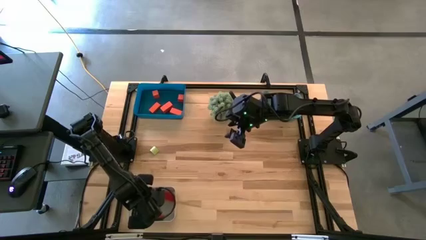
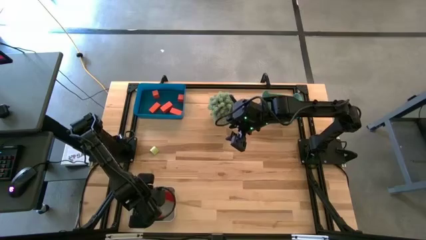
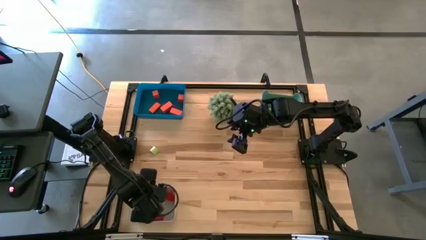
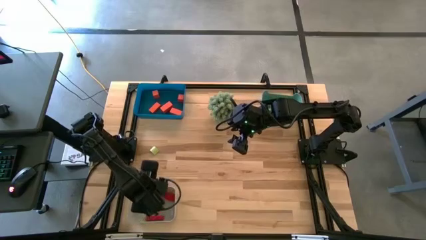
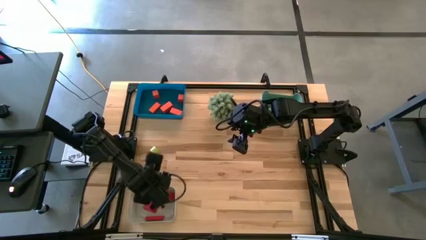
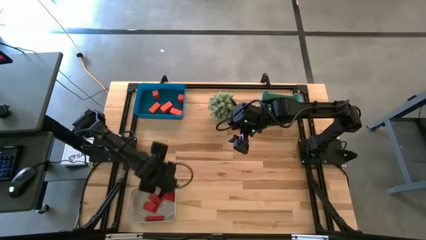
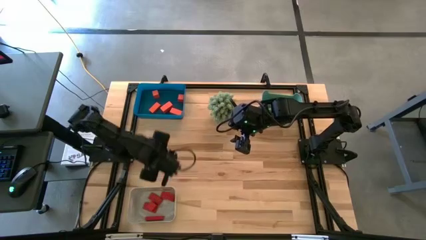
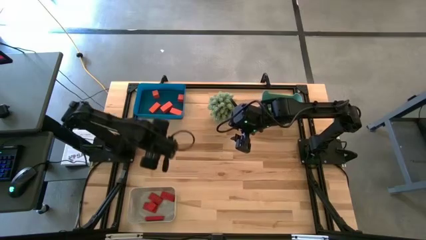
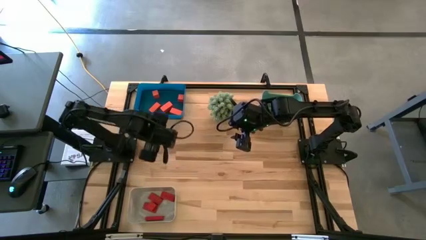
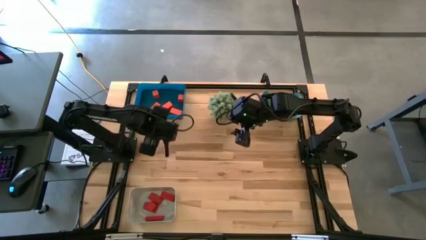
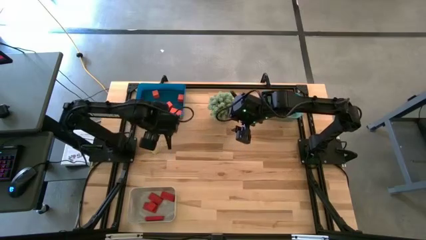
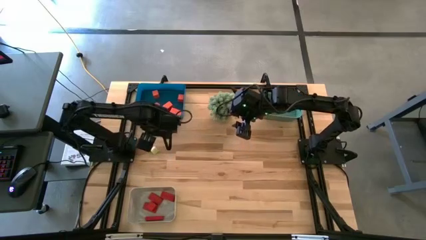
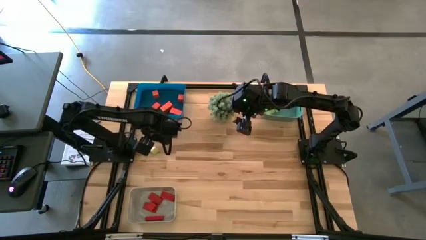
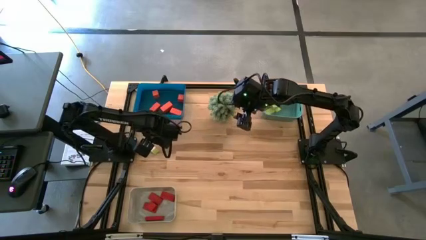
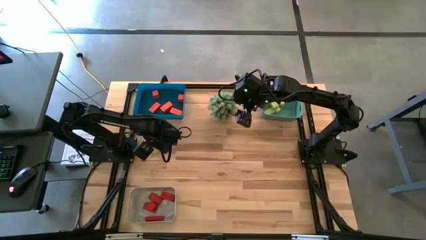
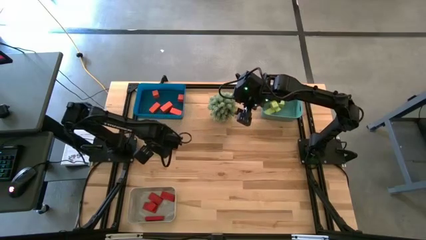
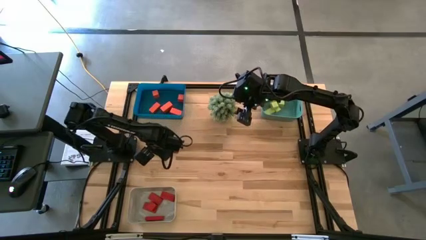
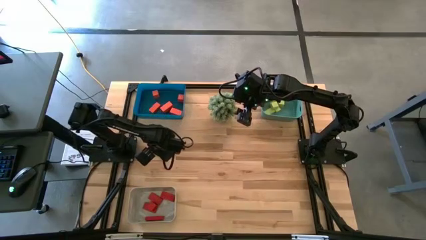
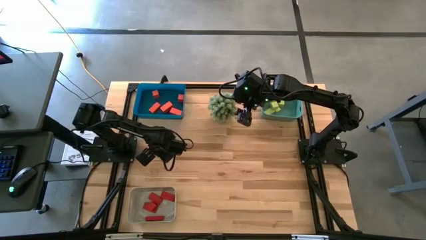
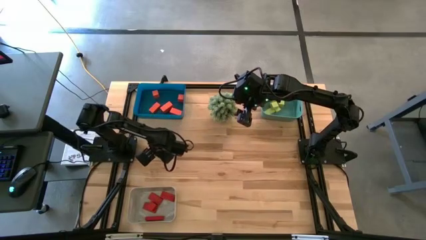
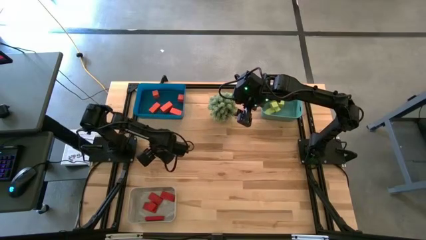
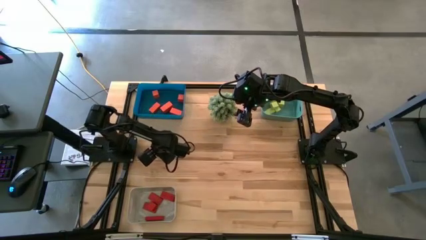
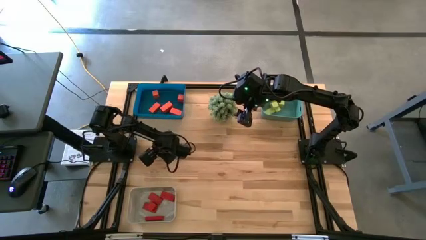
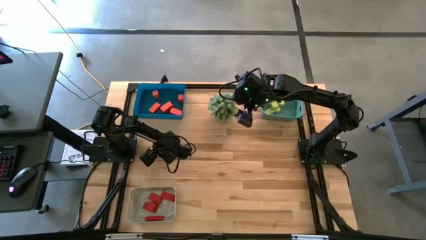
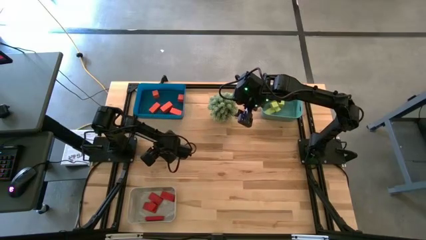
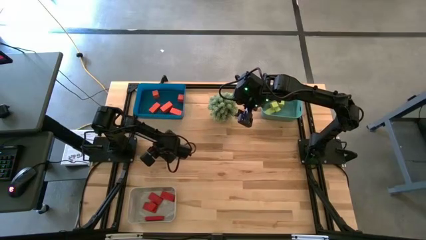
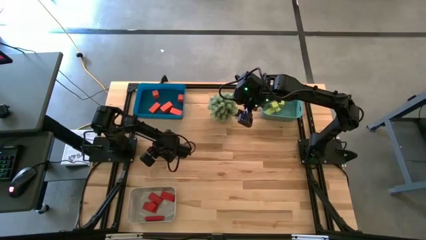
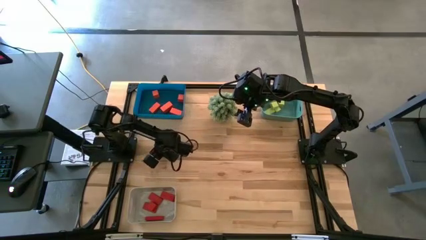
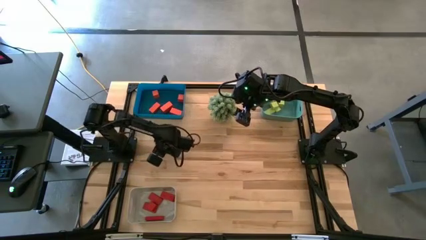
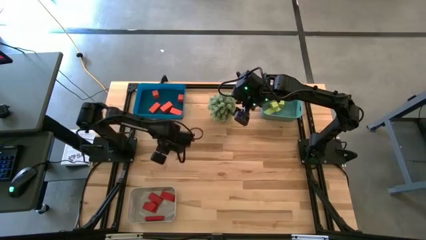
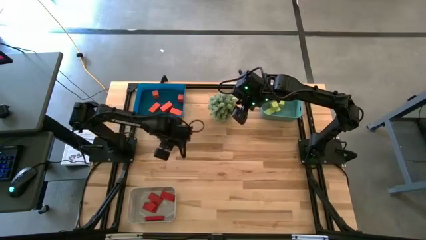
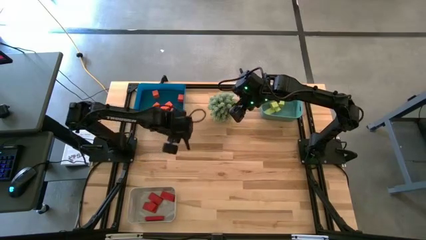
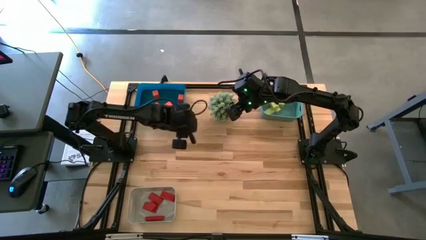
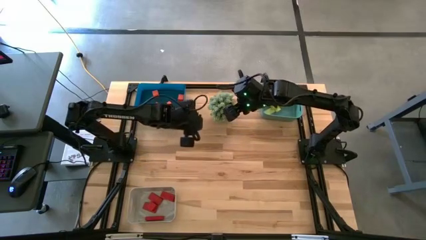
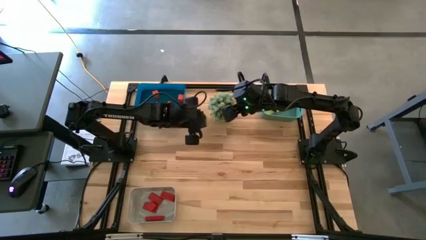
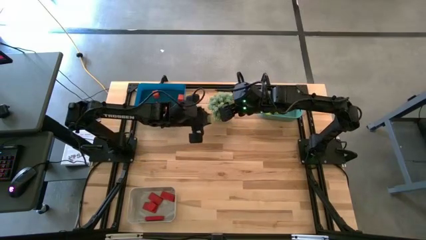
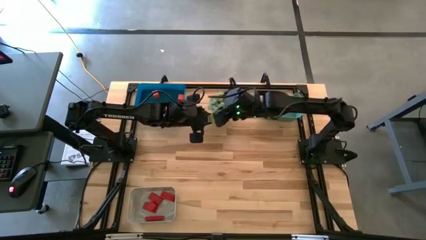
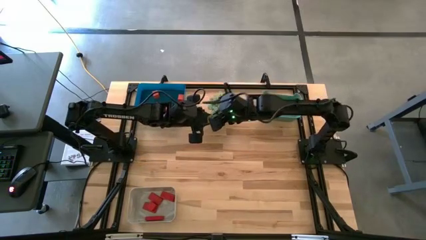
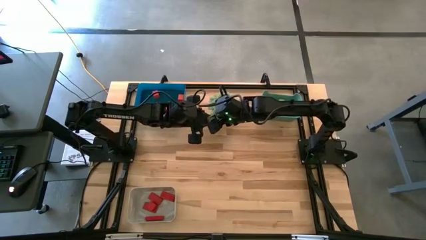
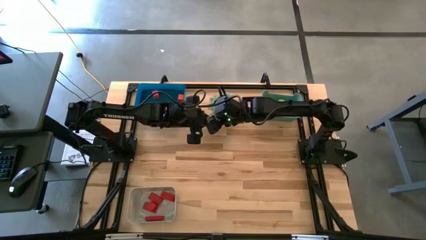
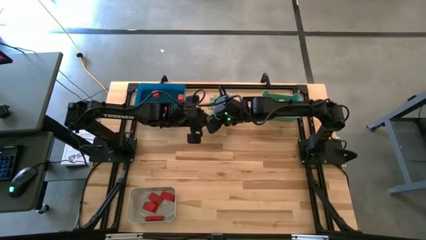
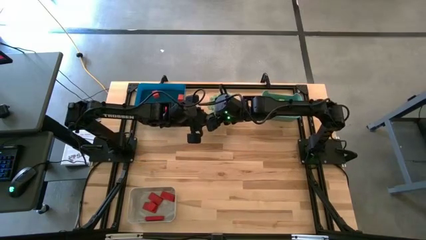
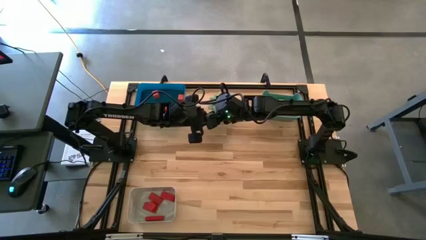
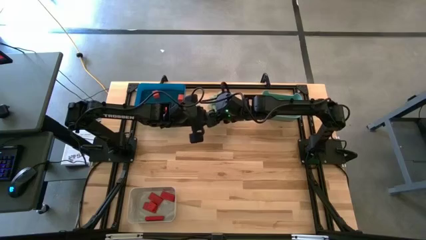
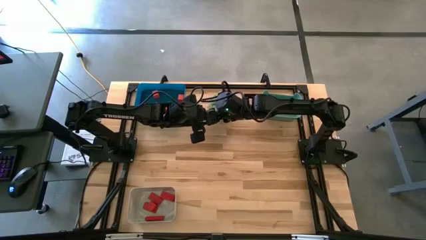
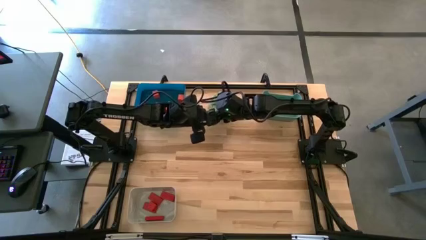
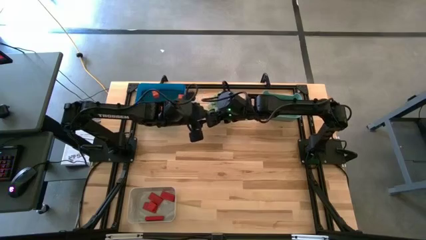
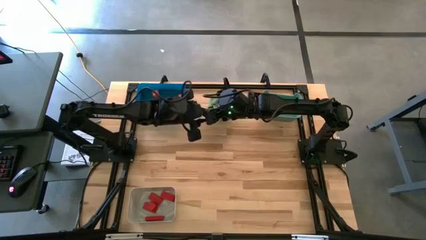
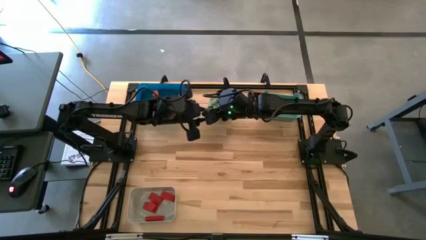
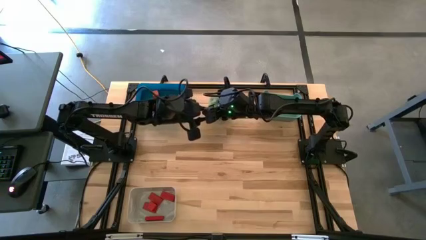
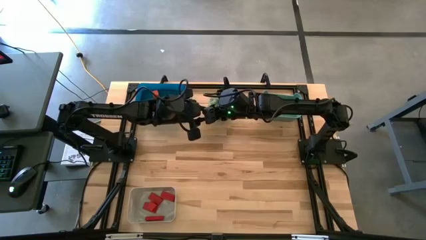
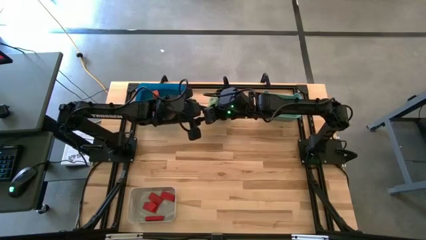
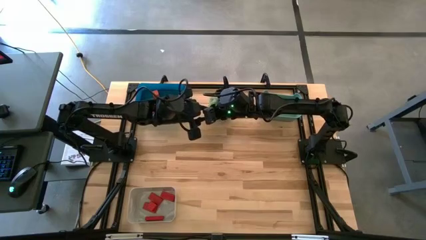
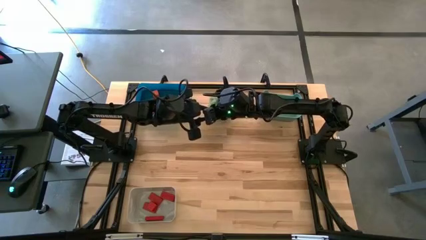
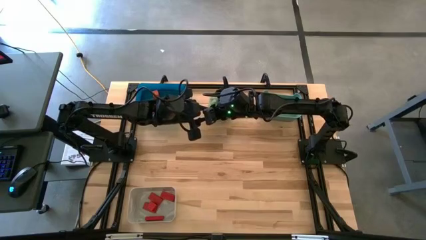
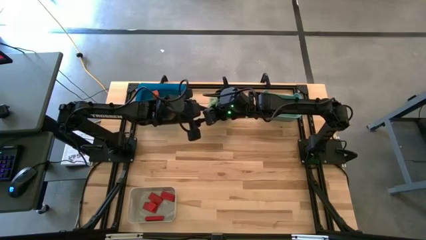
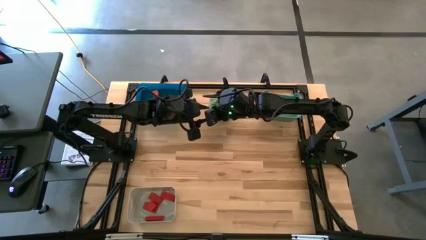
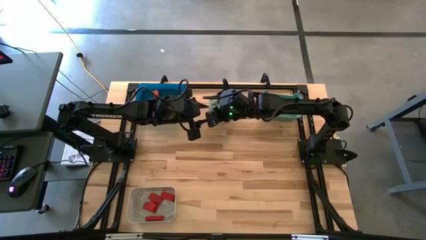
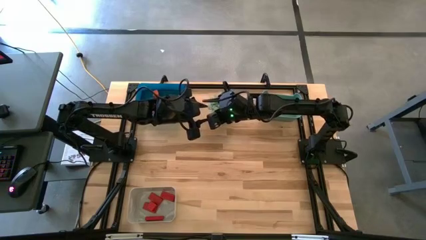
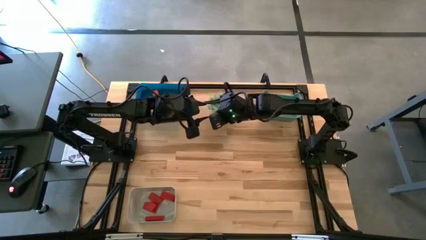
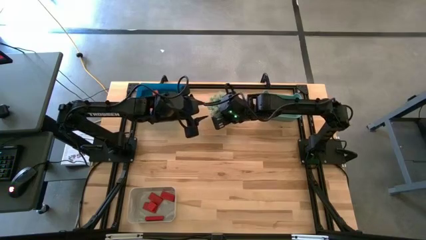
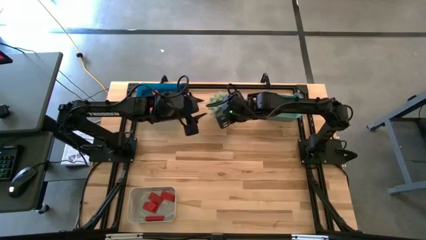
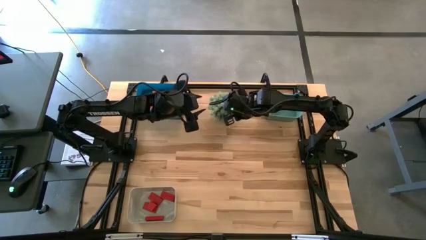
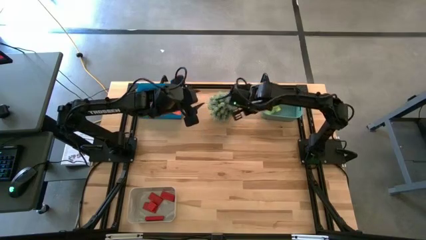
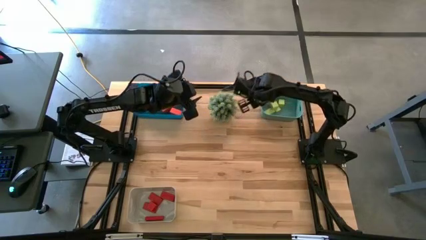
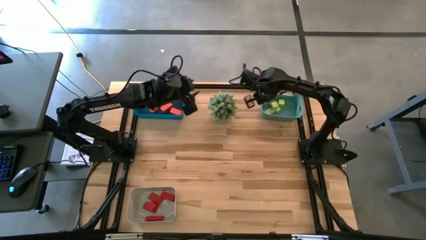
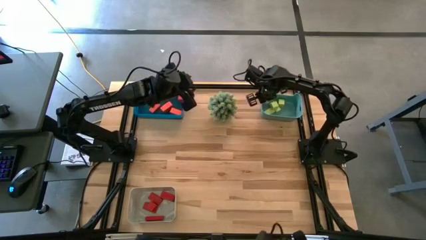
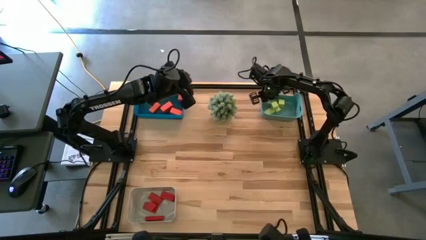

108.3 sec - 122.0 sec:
Task: Sort & place blocks by color
Put the light green block into the green bin

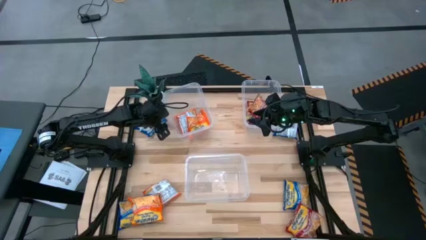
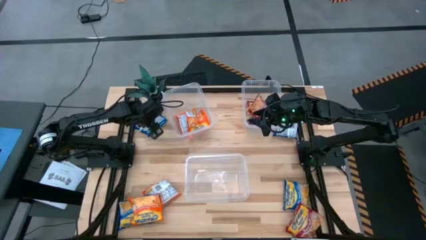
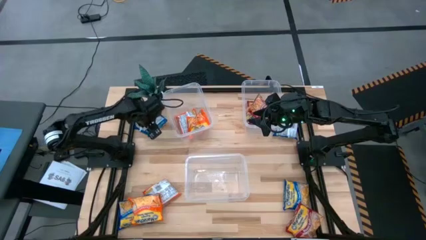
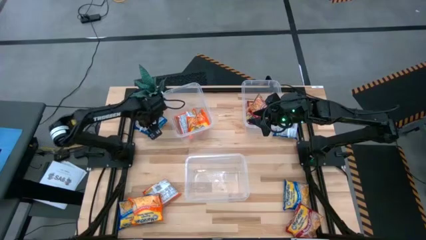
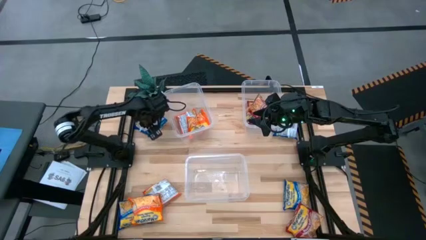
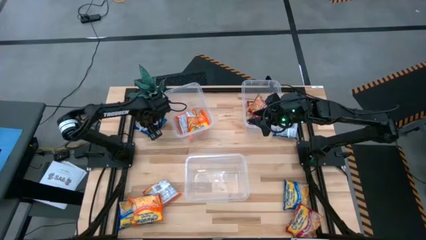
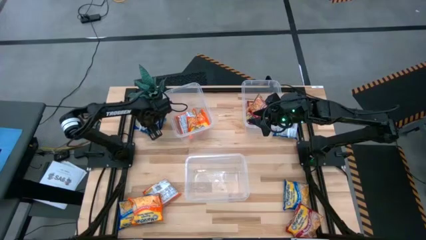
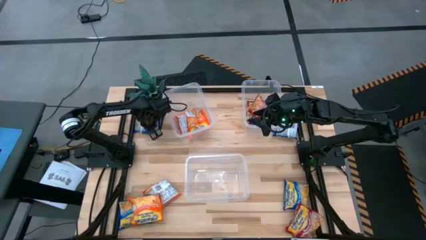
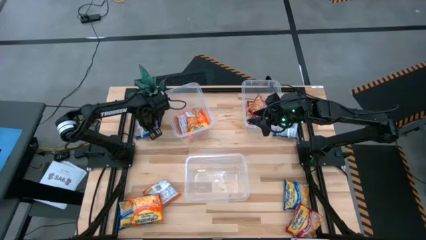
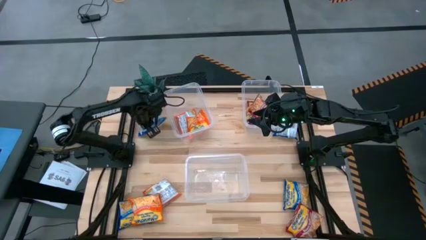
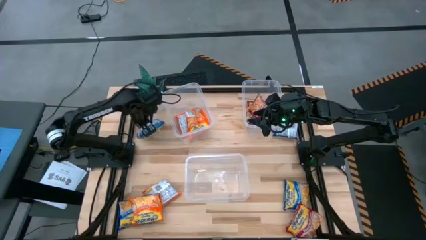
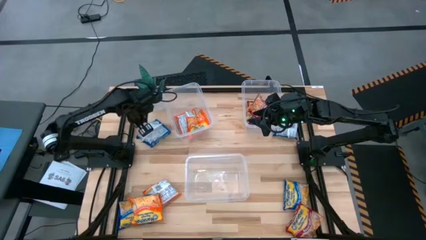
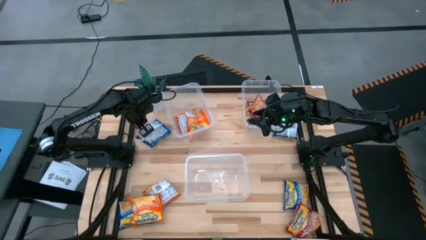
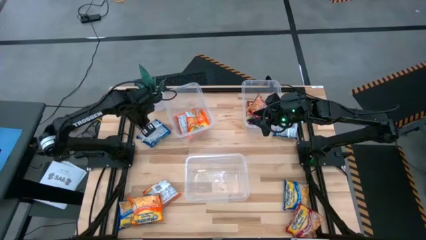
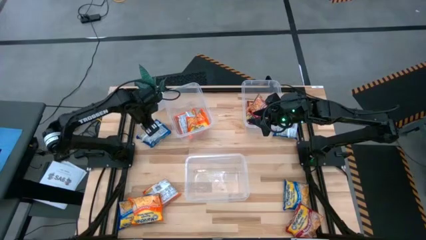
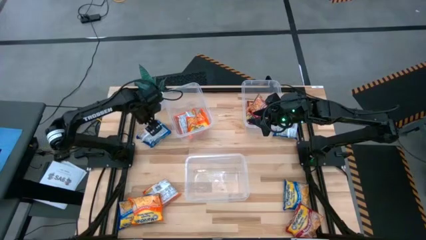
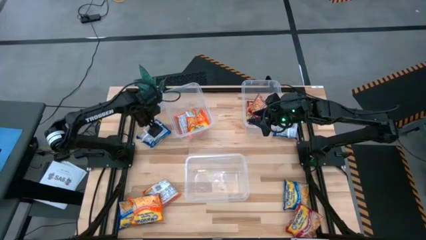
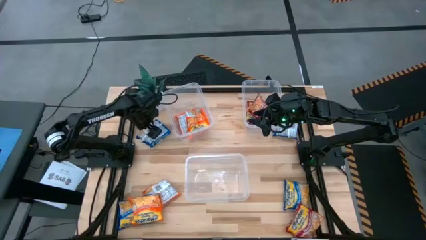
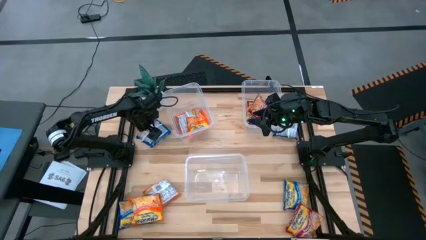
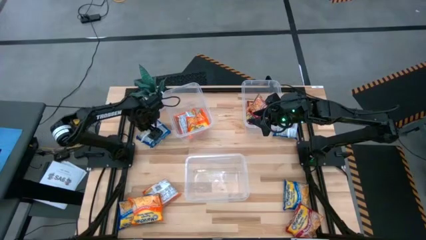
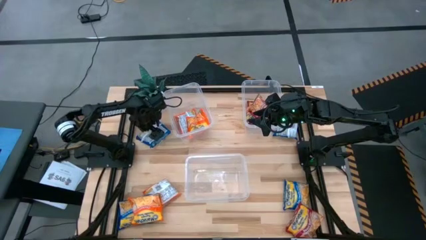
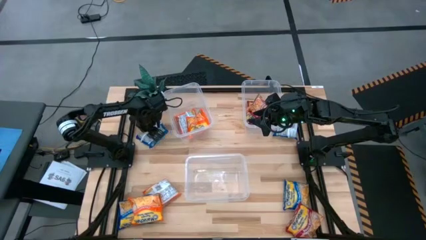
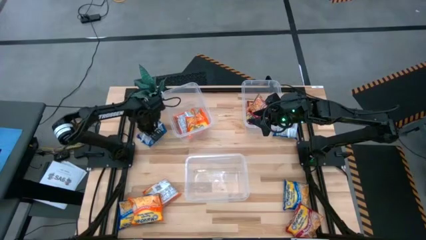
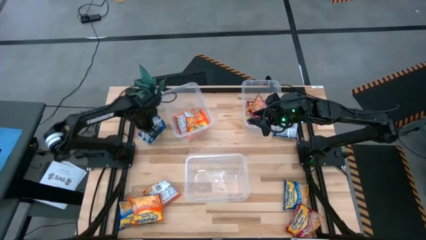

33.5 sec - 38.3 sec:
Task: Sort Maruchan noodles
Put the top left blue bag into the bottom transparent bin
